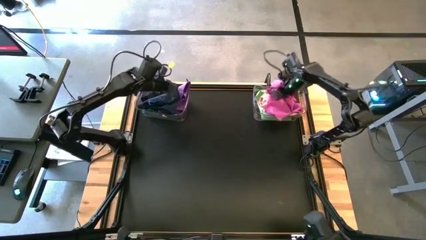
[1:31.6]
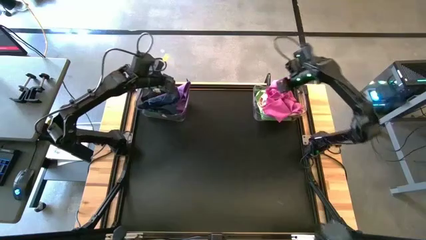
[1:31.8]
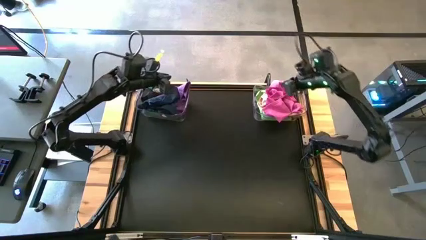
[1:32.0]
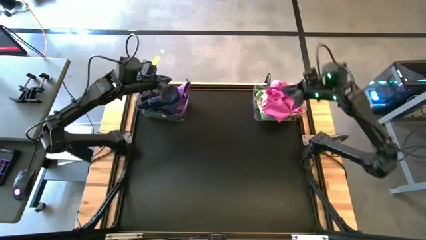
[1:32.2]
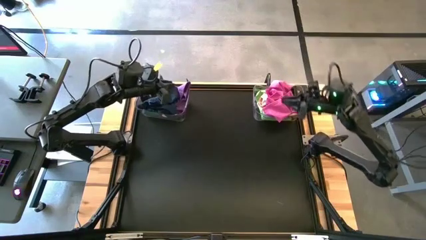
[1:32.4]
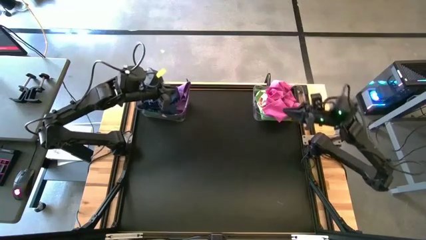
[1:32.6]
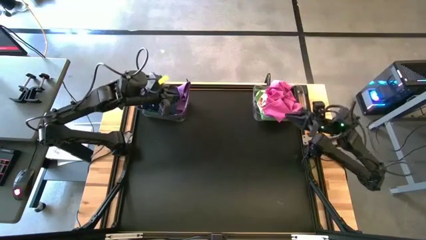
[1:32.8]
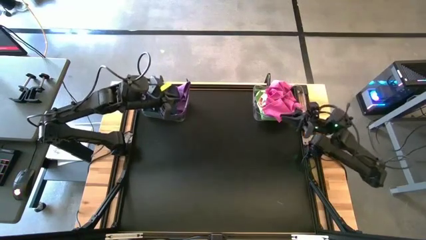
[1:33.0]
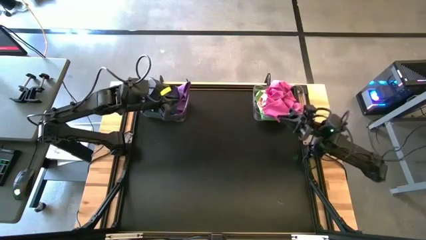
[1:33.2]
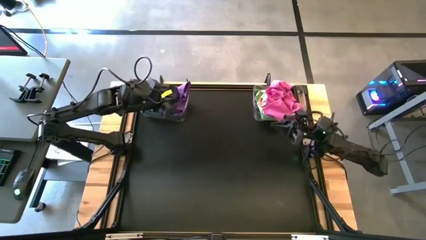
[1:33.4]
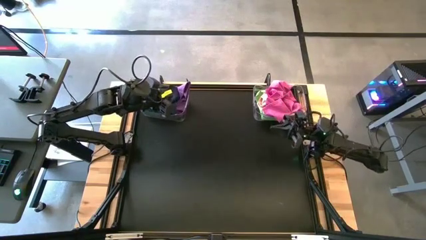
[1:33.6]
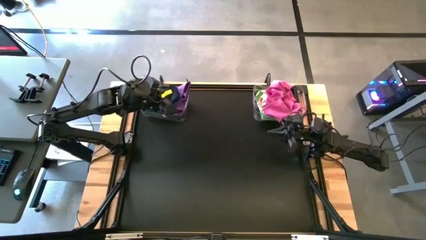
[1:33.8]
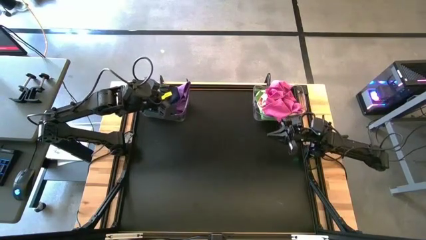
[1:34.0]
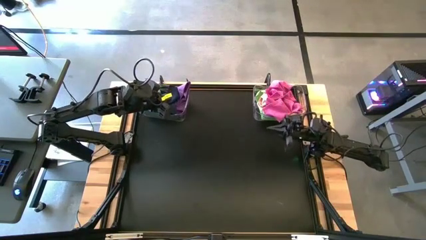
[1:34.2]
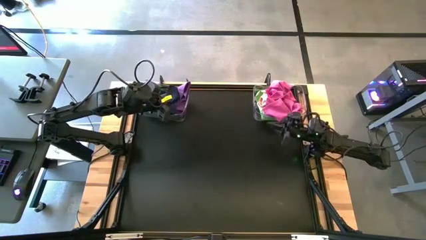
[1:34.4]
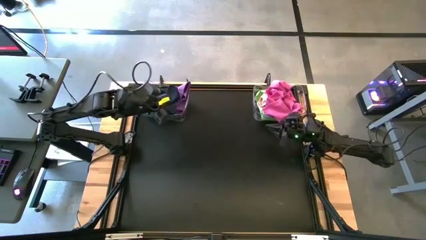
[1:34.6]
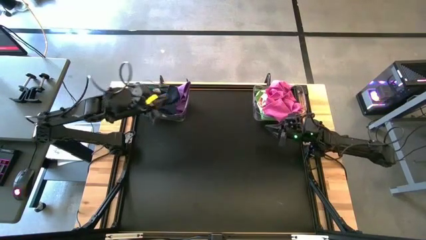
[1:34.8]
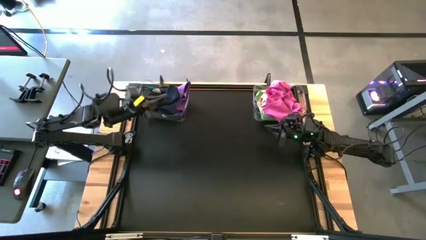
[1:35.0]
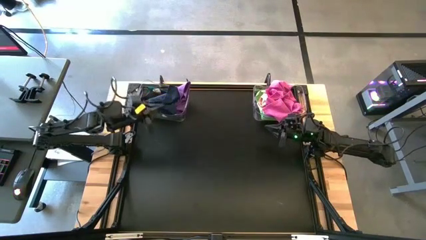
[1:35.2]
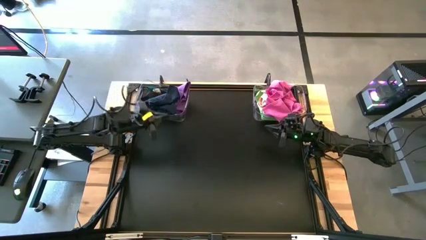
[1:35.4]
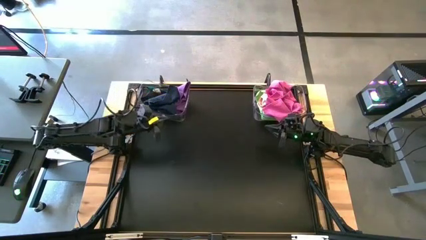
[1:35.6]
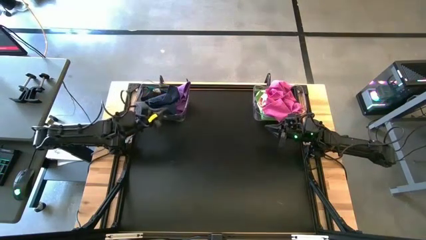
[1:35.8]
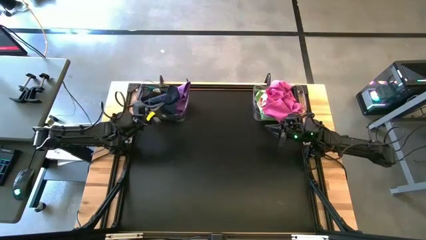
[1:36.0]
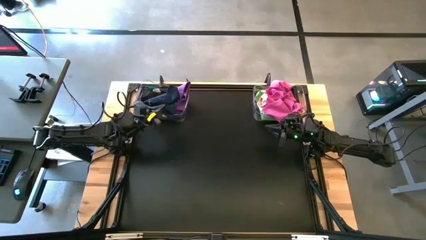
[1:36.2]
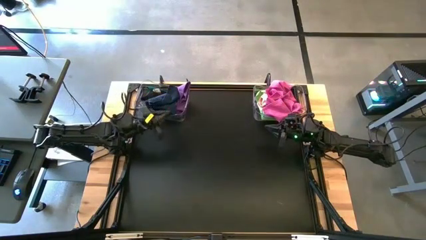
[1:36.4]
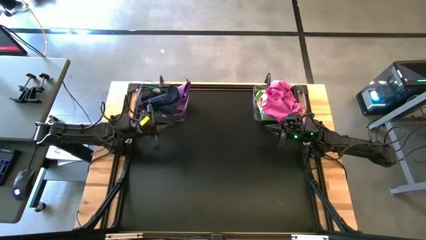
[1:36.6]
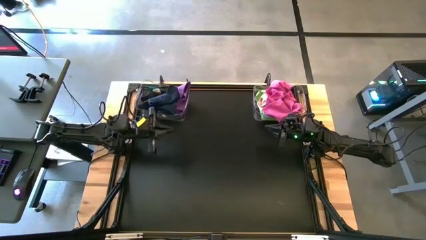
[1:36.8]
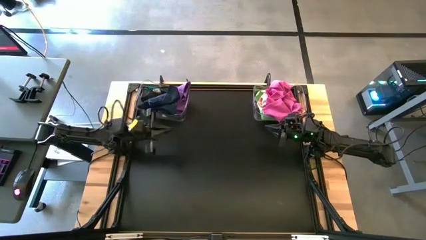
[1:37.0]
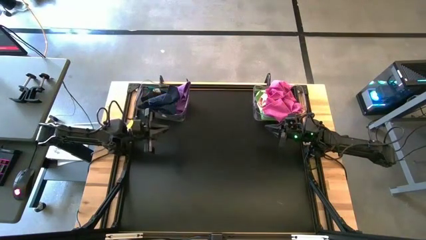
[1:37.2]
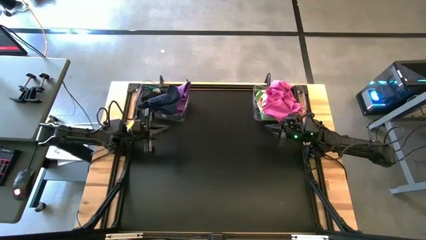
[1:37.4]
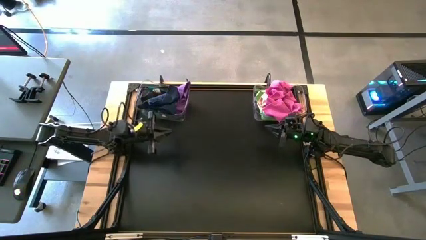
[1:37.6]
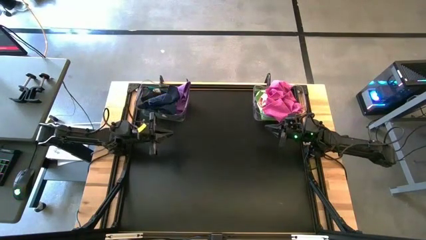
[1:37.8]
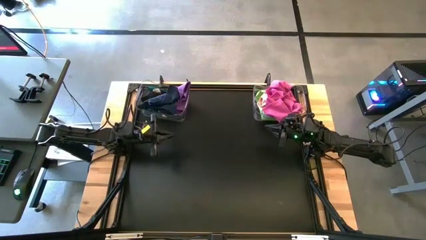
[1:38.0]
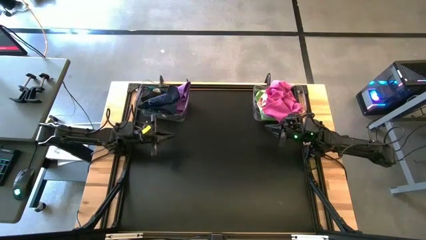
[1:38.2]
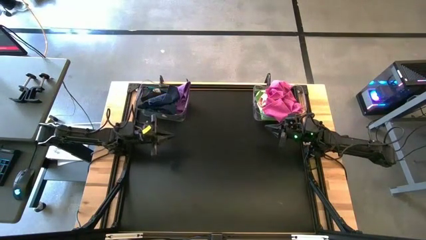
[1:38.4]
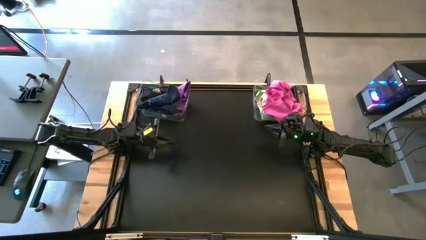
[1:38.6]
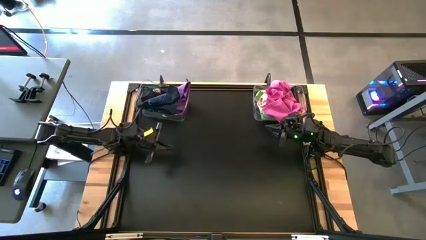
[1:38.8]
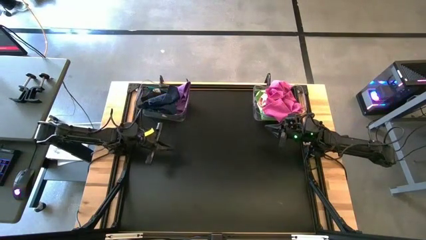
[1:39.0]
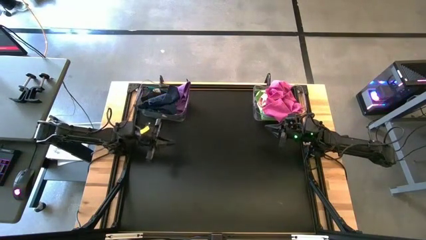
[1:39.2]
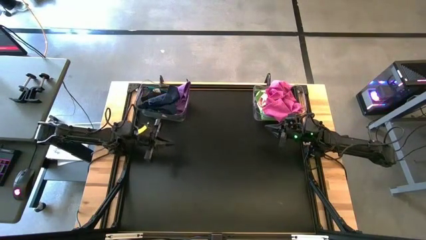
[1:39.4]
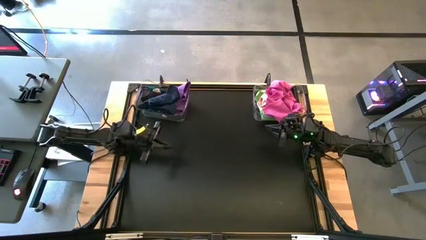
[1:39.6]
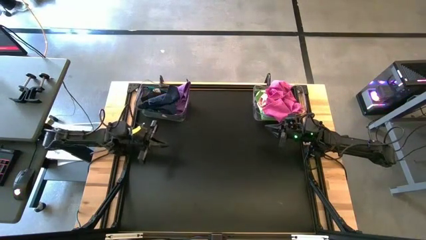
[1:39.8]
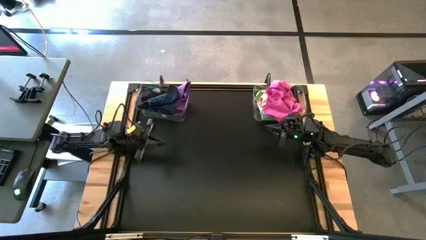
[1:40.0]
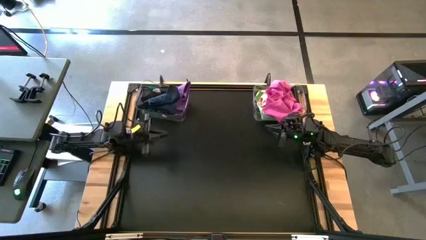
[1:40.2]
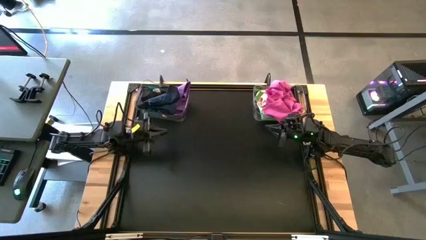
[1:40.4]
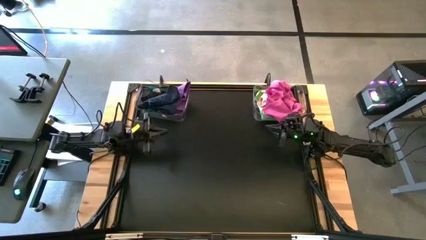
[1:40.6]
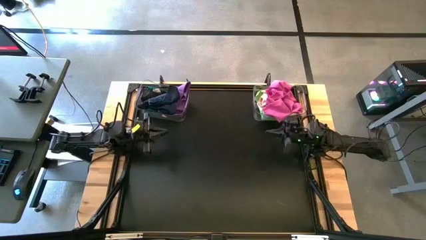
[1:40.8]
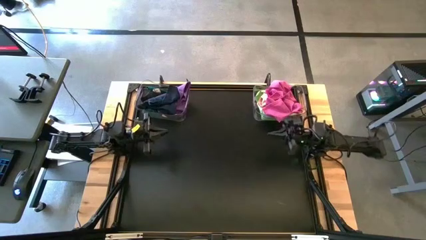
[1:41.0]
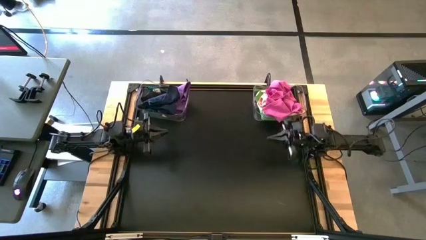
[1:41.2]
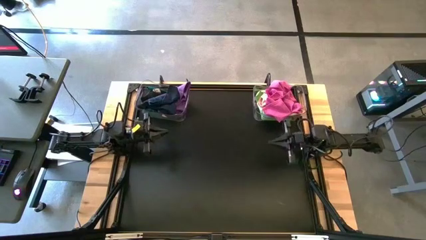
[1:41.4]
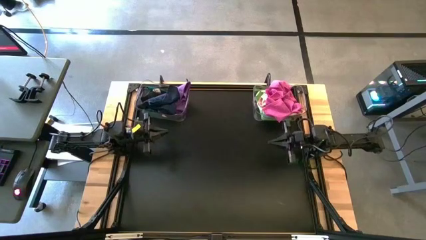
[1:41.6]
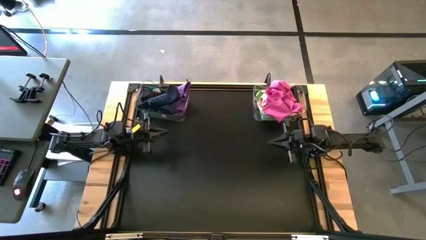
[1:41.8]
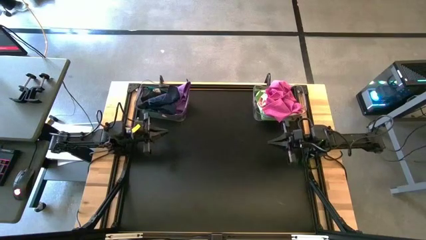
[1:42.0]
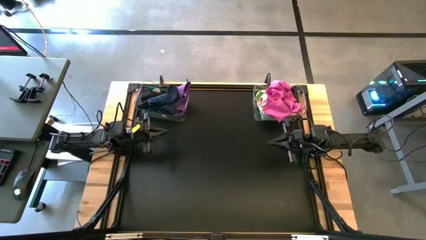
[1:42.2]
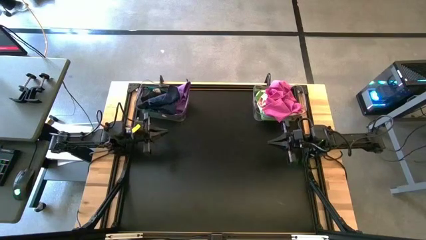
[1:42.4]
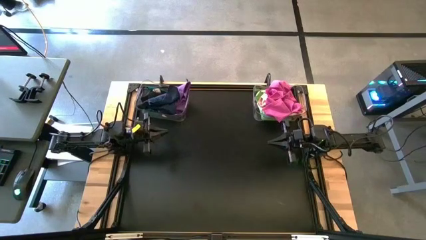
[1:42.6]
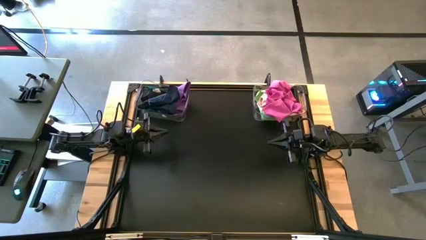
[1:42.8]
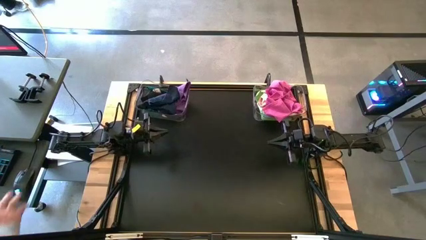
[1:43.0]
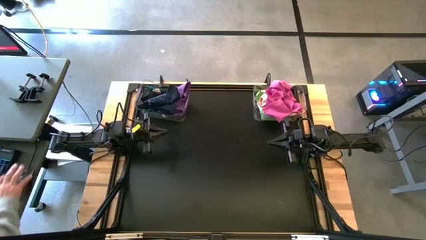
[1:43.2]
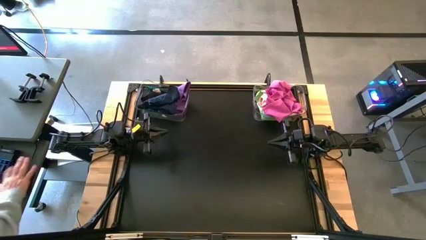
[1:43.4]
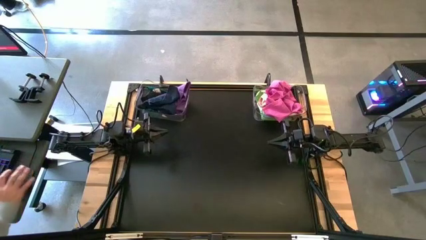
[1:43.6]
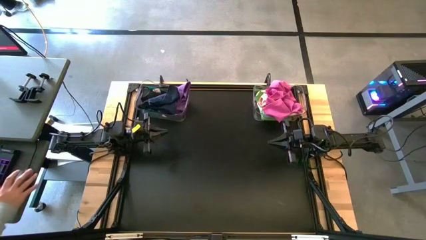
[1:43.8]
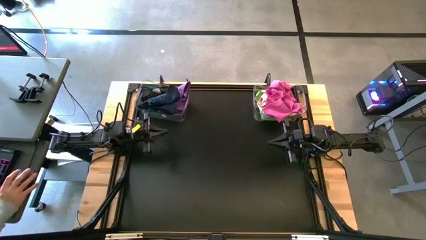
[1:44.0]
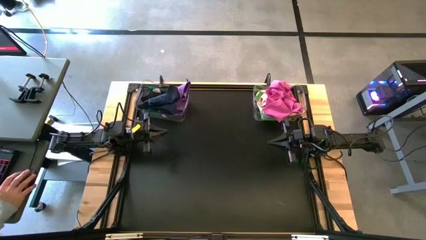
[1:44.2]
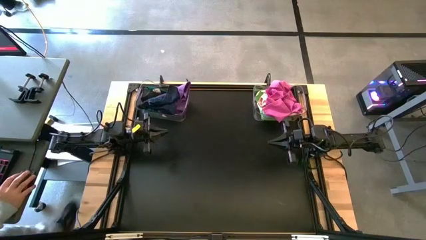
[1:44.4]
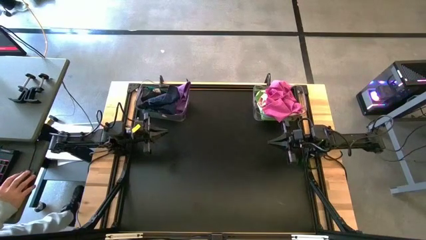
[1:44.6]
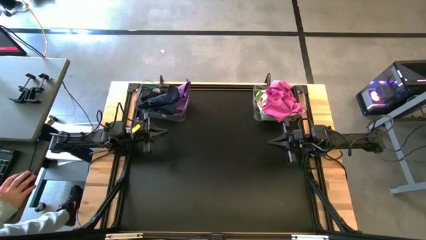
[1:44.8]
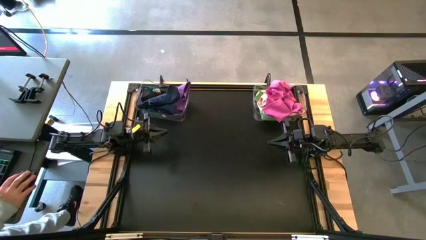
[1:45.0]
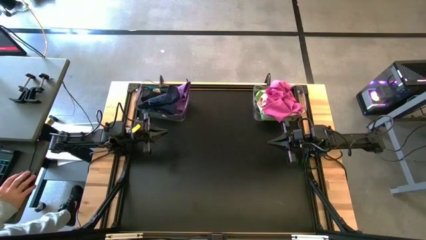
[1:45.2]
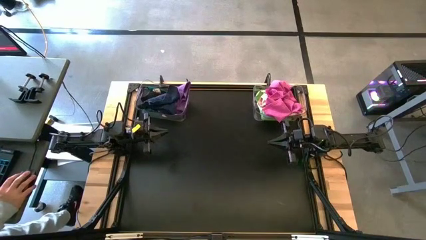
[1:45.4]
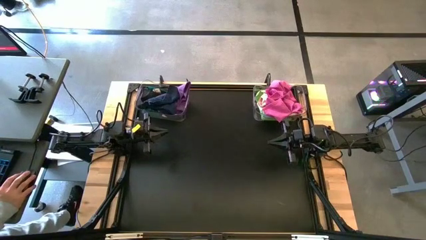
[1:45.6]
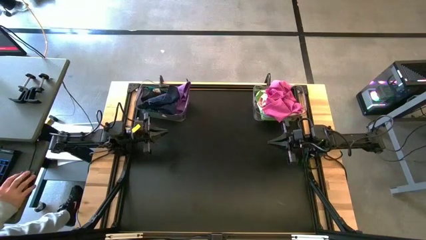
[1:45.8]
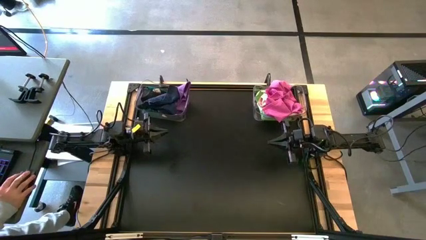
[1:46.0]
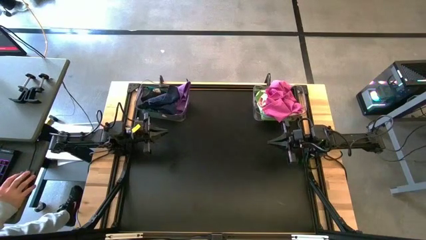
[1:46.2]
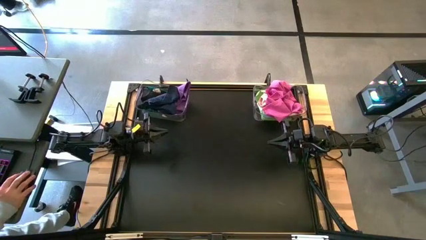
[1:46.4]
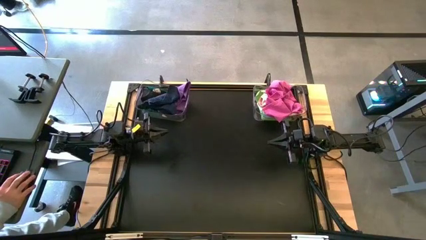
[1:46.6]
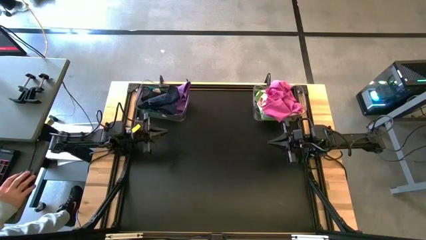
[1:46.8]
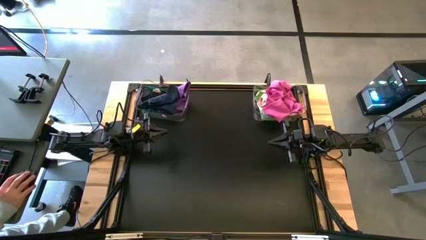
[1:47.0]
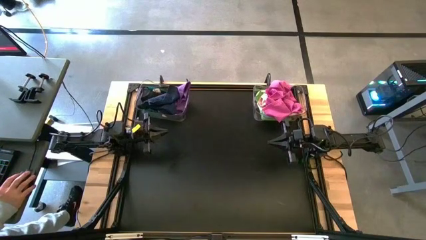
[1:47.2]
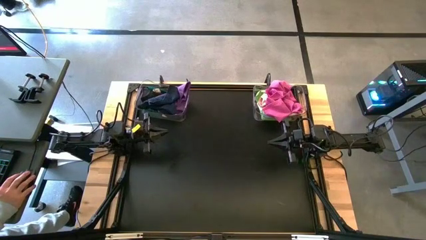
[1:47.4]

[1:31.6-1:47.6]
Task: Sort towels by color in basket
Return to Home Position

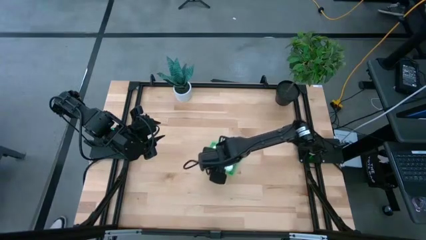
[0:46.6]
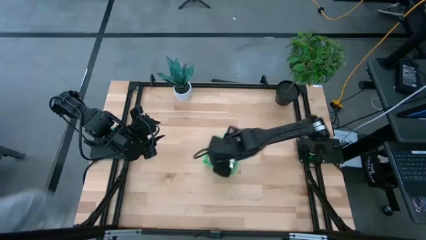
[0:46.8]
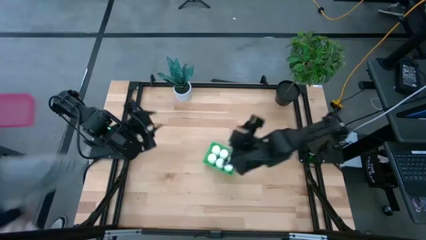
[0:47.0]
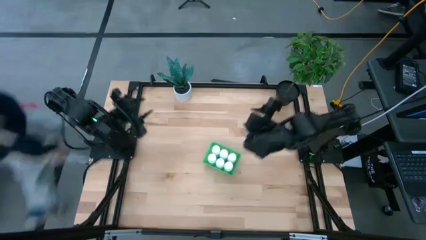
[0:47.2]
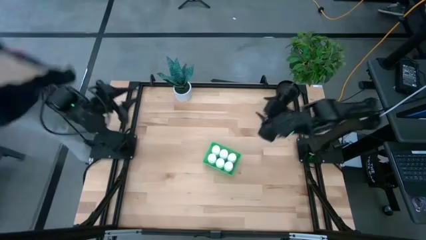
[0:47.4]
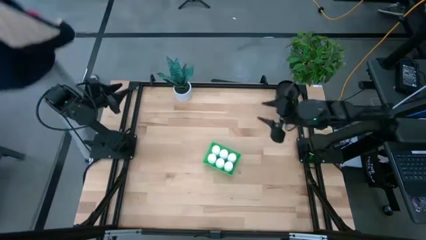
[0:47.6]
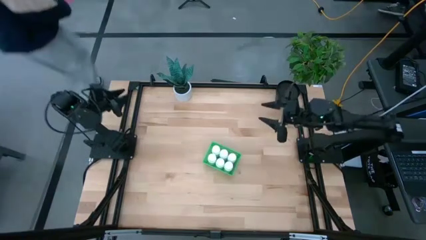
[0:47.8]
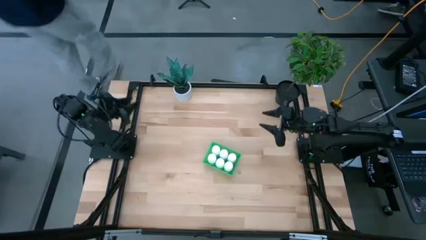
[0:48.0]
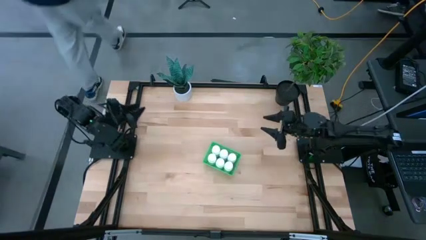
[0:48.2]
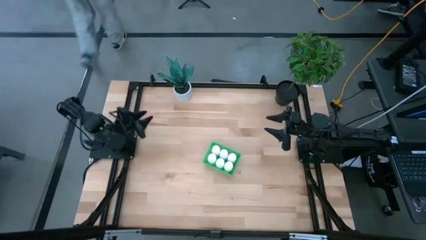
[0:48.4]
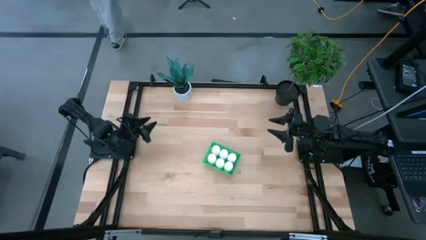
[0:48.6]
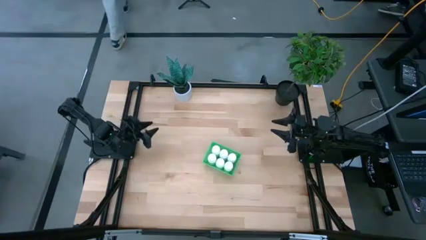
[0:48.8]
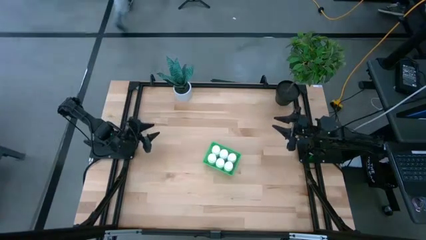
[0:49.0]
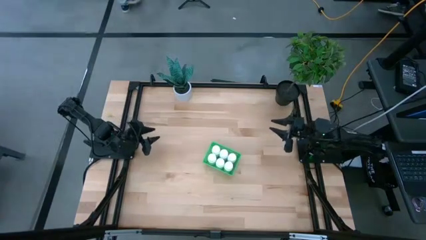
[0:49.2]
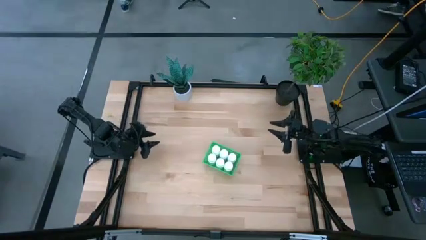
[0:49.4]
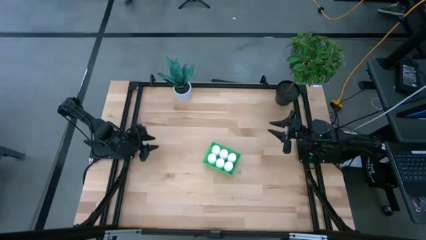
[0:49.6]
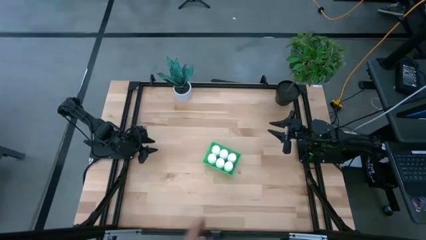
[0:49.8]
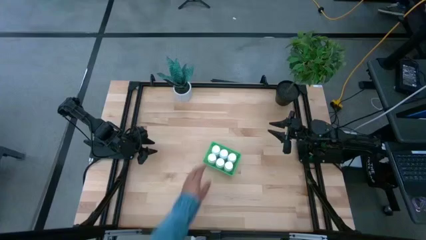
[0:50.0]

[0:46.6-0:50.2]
Task: Pick and place pill bottles into a basket
Return to Home Position
